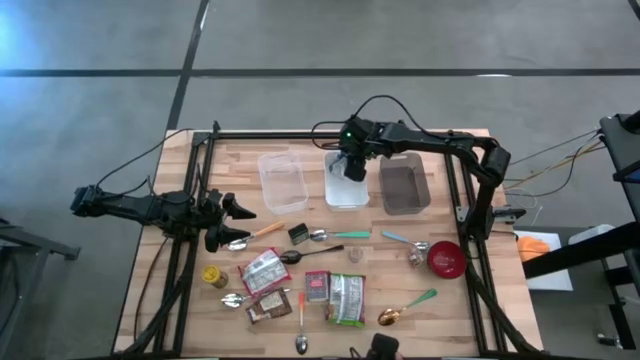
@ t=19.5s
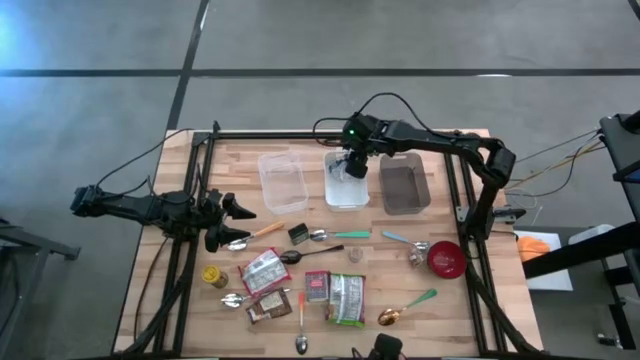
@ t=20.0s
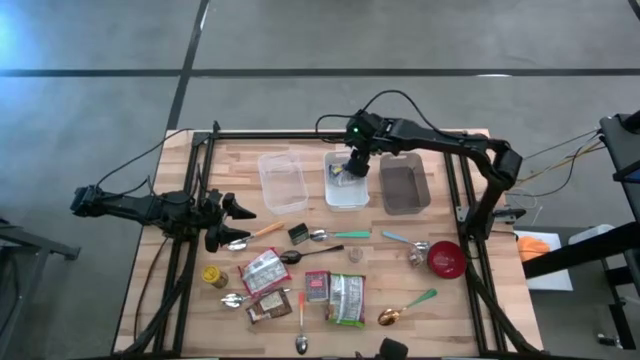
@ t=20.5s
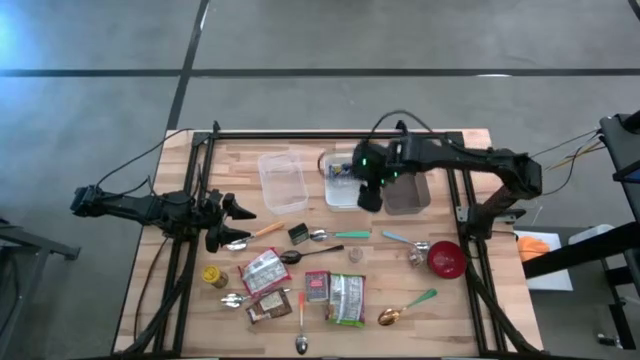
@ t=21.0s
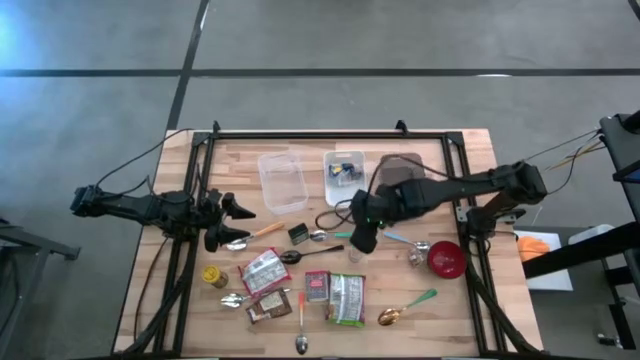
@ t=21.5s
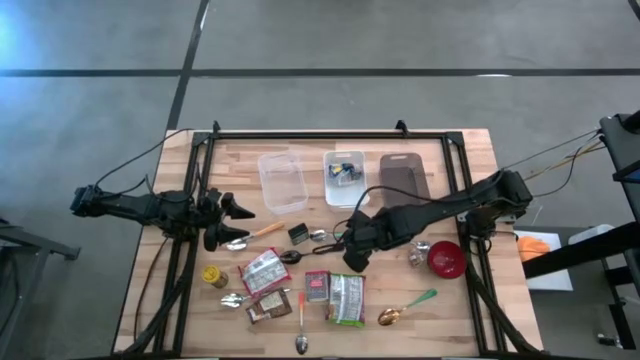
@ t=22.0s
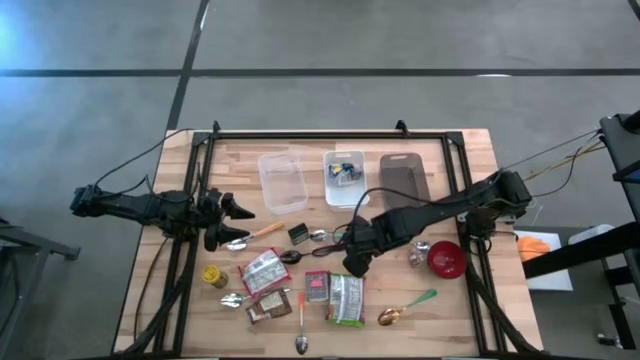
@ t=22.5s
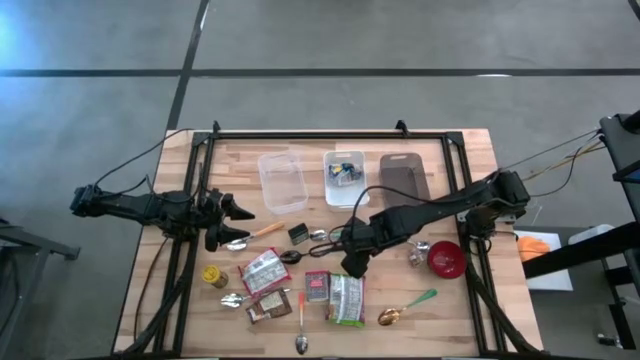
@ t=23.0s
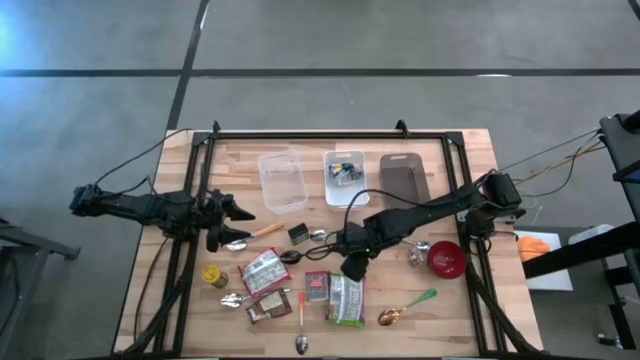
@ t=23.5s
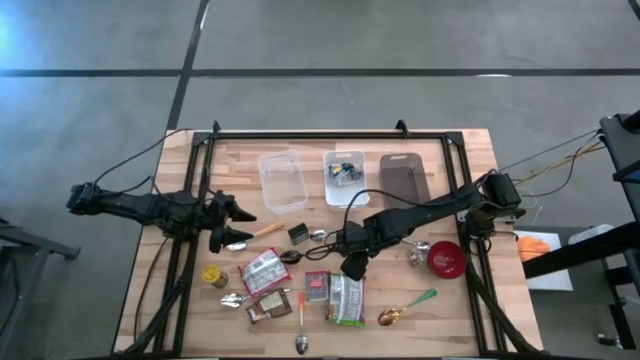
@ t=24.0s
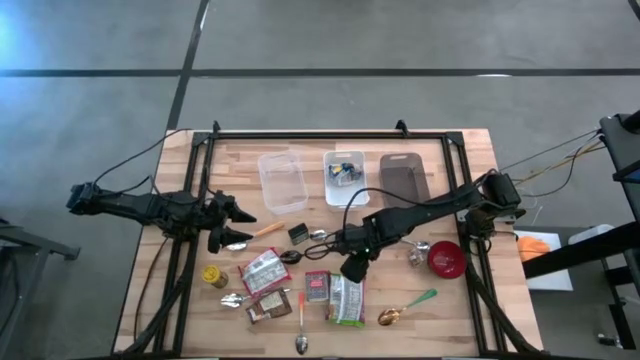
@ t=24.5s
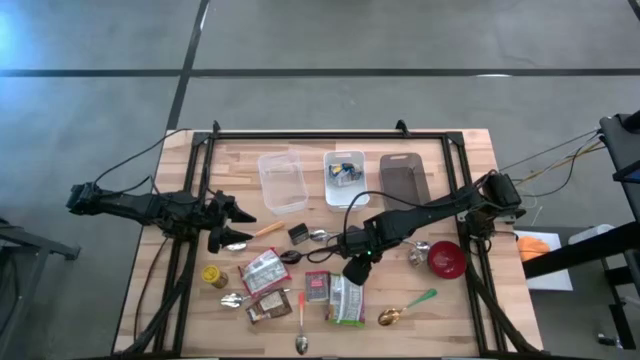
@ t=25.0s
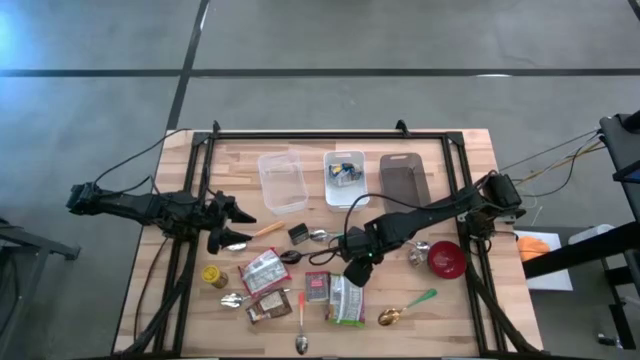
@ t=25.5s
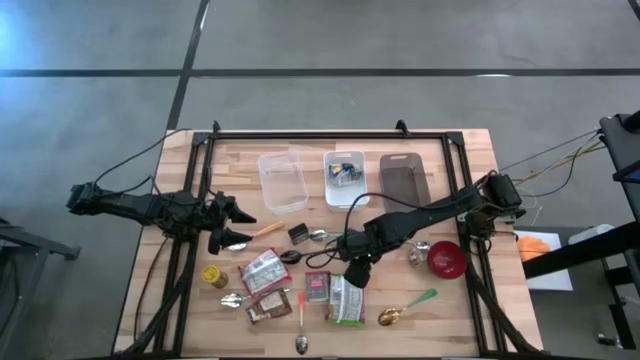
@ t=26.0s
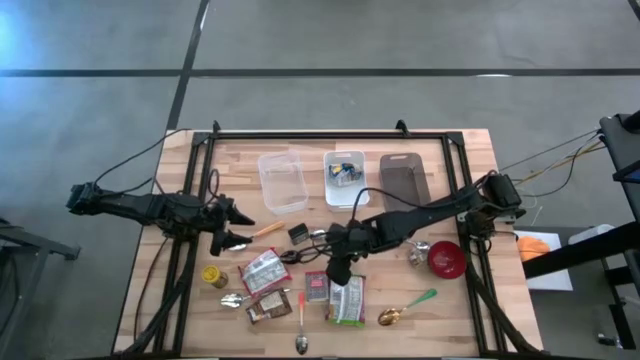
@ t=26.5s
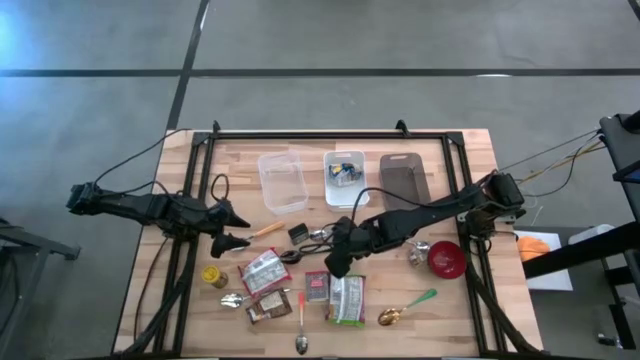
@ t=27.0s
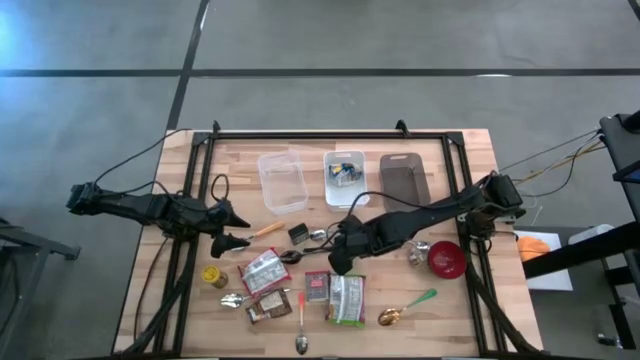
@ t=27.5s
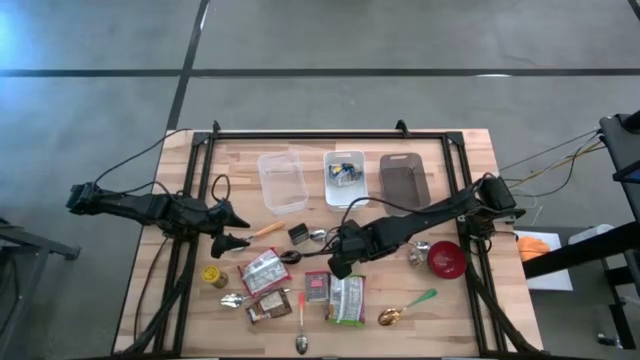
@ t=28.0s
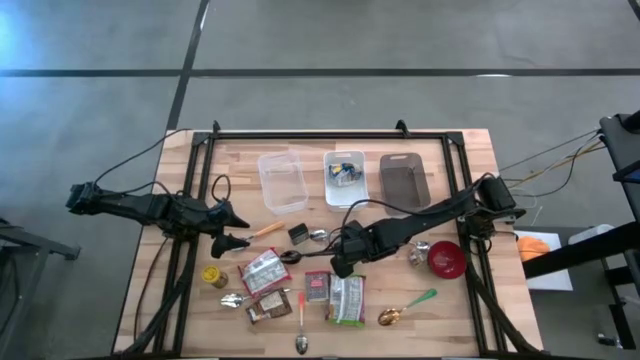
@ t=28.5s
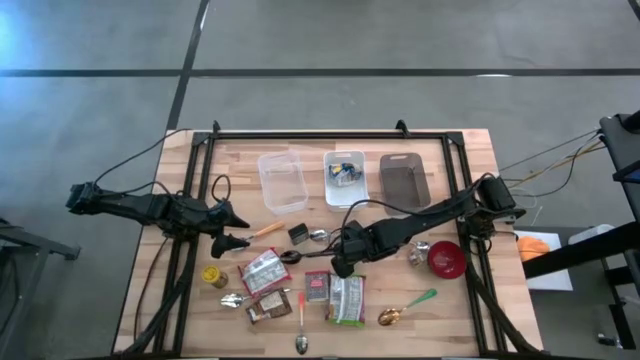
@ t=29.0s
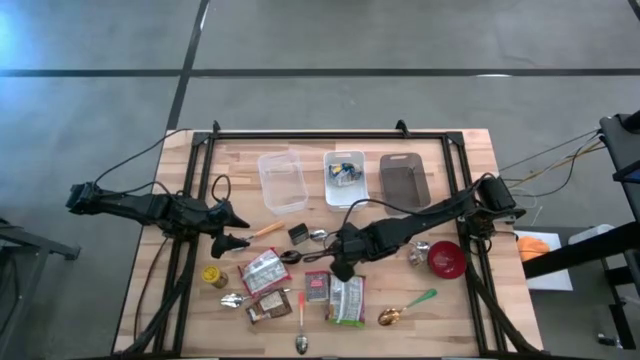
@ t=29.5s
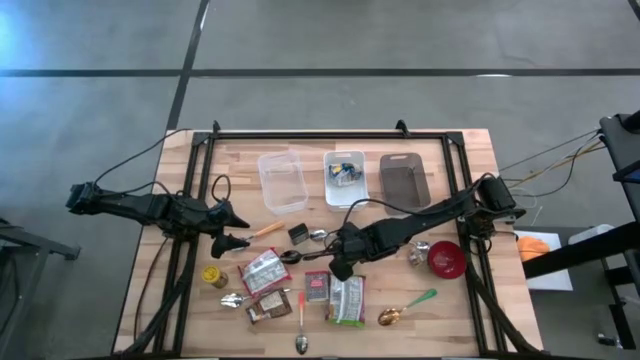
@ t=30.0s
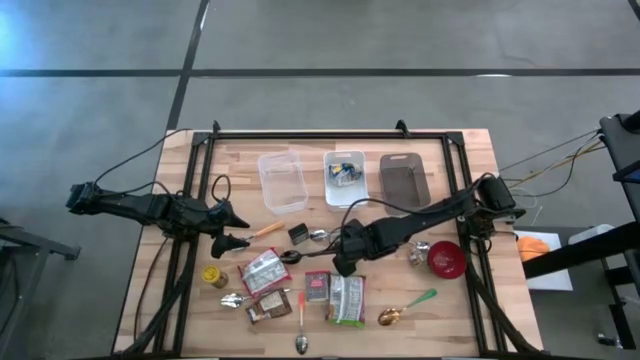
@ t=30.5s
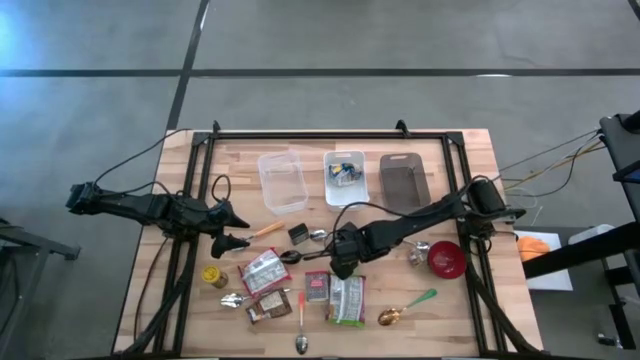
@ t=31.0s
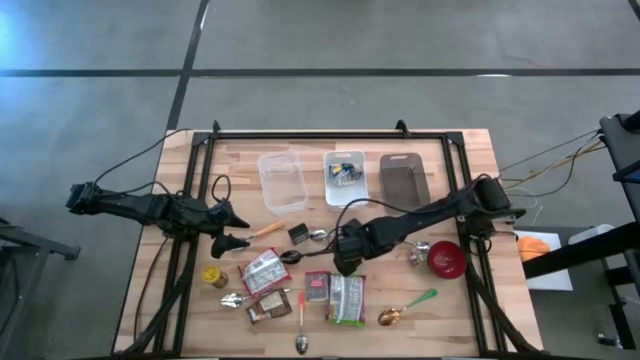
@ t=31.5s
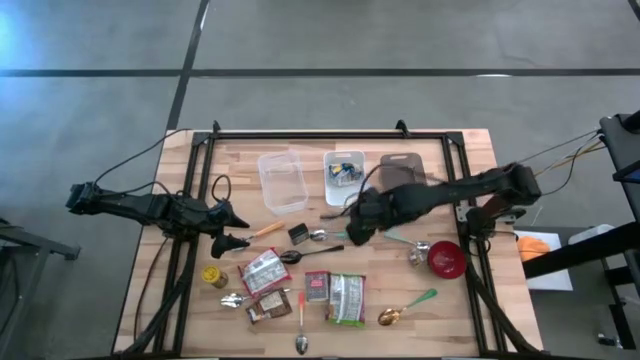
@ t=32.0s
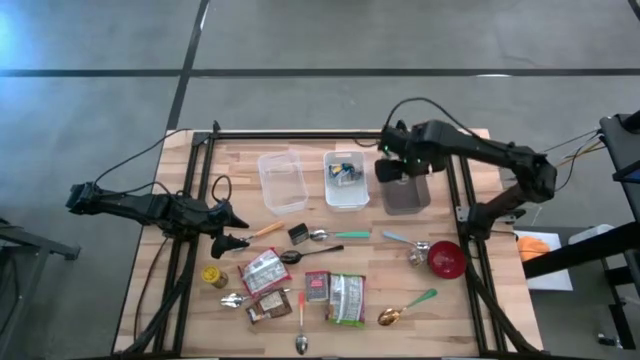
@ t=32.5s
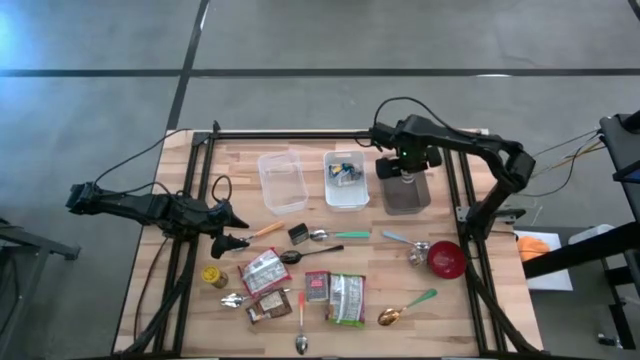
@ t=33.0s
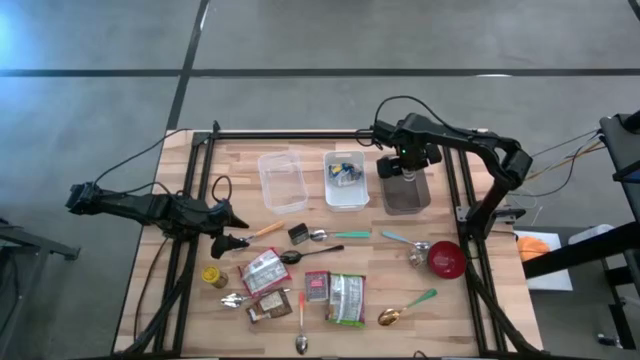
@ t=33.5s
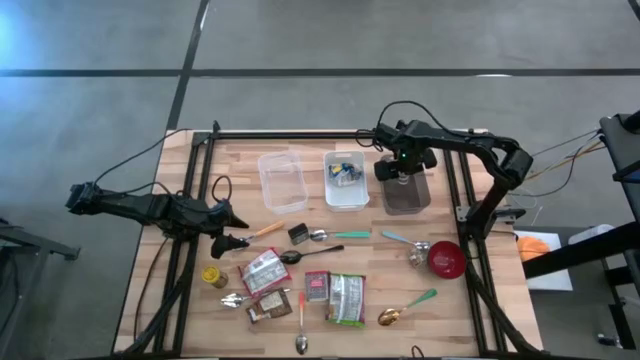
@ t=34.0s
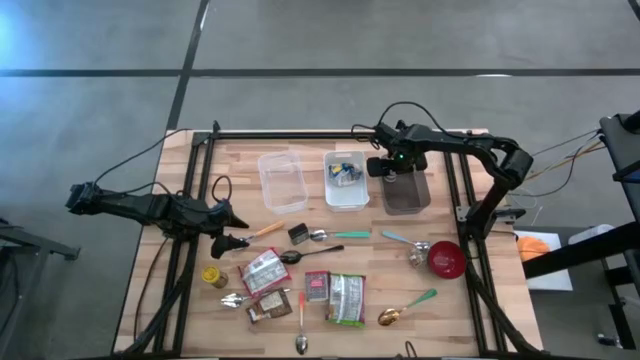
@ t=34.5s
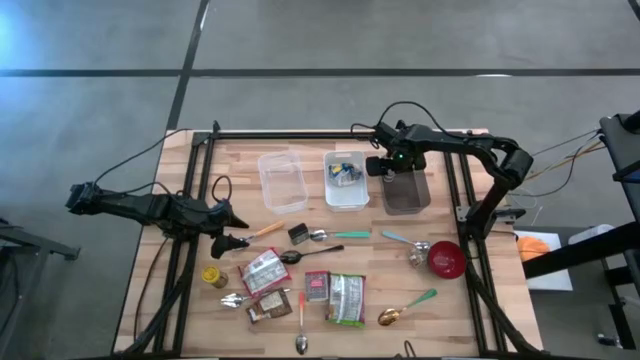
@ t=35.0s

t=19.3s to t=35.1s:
Put the left brown seasoning bottle into the black bin
